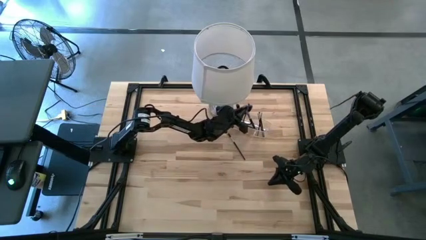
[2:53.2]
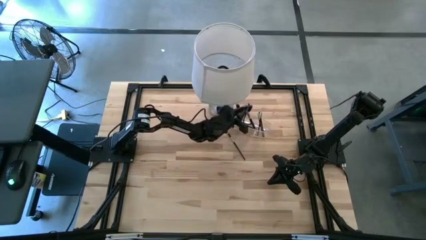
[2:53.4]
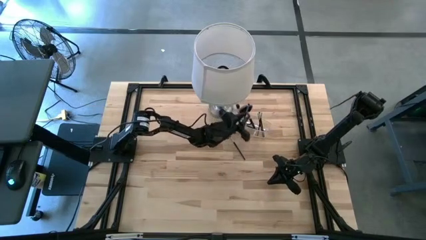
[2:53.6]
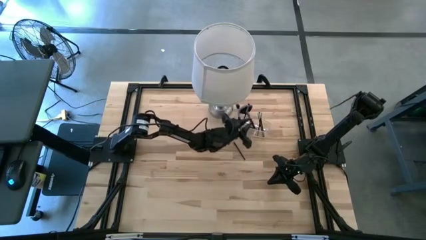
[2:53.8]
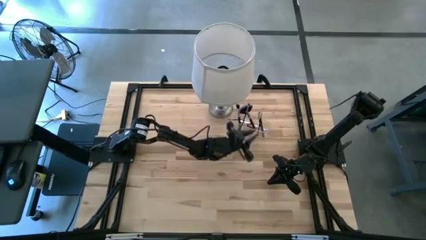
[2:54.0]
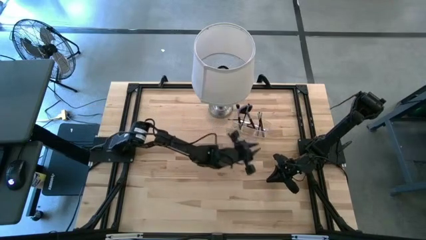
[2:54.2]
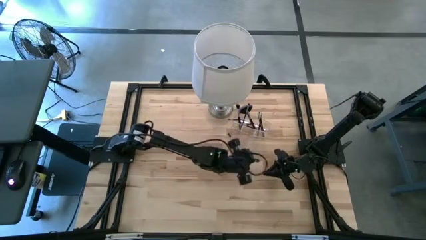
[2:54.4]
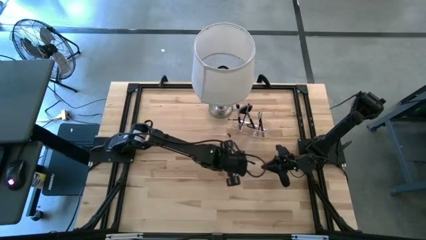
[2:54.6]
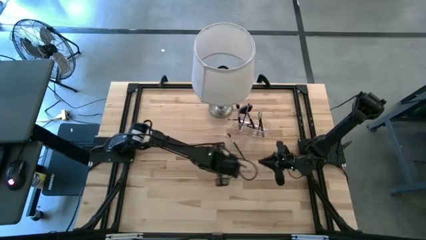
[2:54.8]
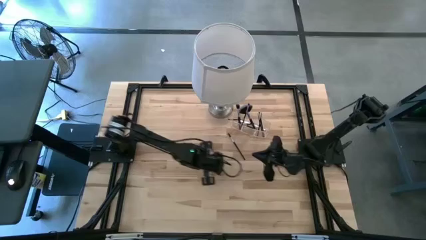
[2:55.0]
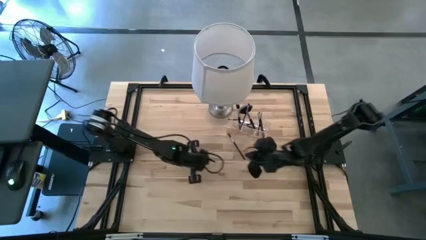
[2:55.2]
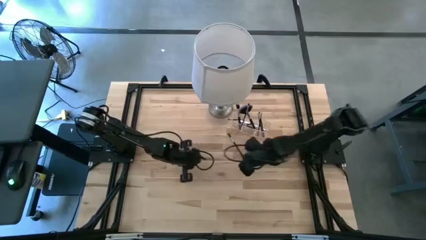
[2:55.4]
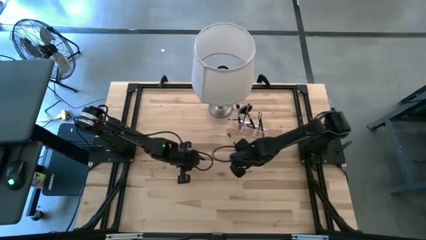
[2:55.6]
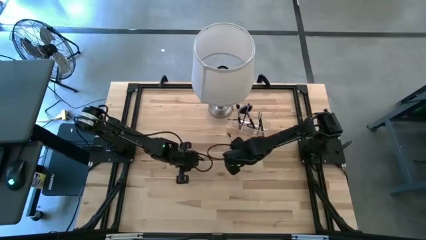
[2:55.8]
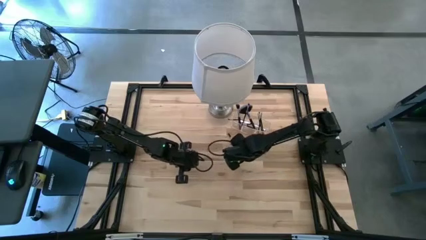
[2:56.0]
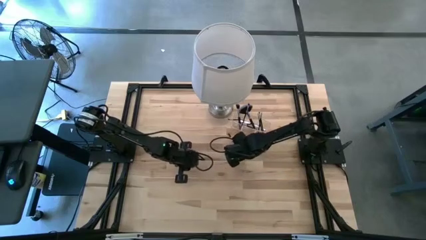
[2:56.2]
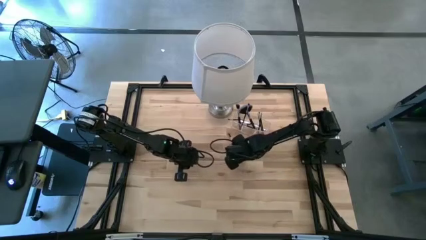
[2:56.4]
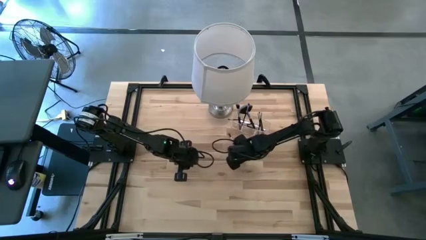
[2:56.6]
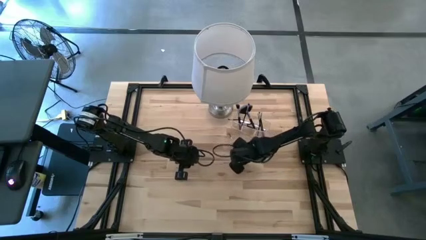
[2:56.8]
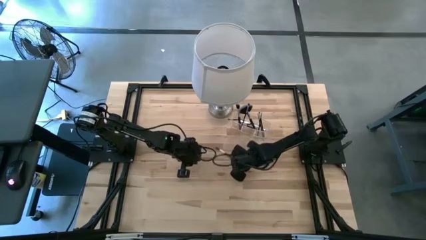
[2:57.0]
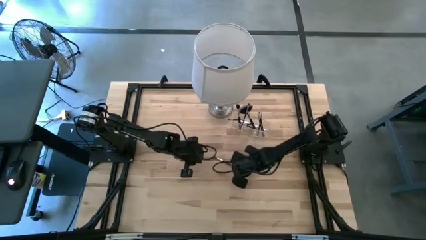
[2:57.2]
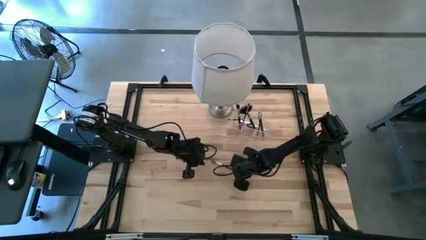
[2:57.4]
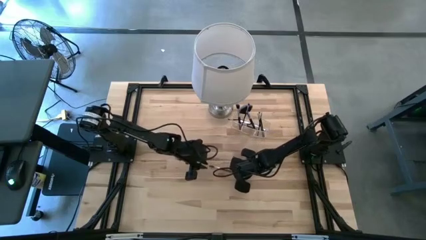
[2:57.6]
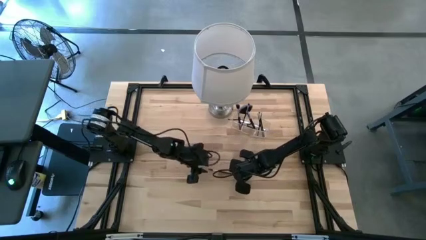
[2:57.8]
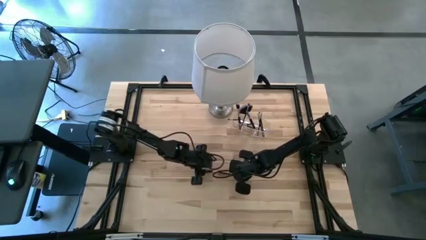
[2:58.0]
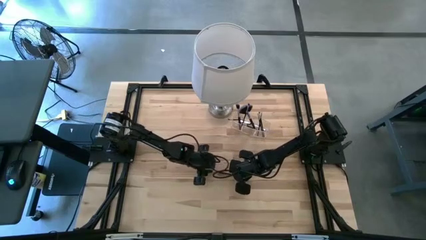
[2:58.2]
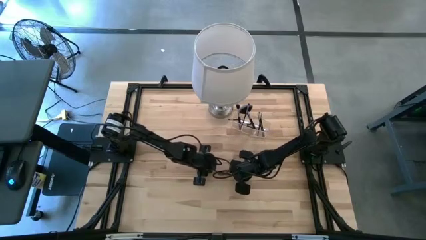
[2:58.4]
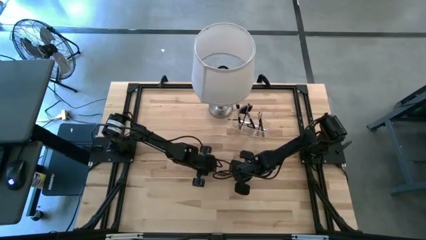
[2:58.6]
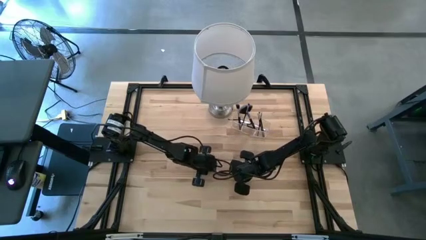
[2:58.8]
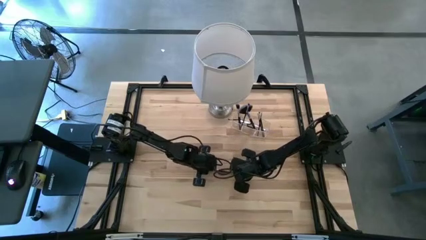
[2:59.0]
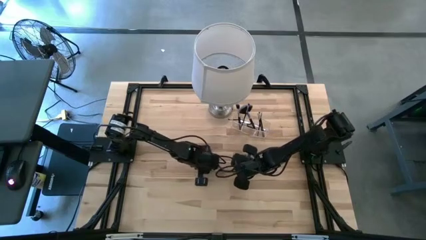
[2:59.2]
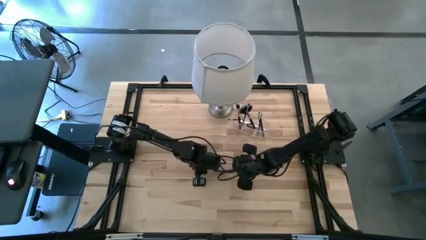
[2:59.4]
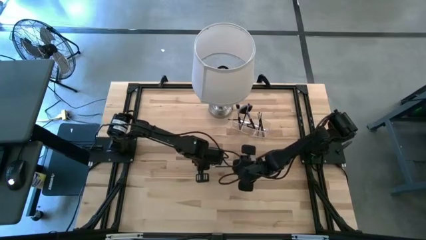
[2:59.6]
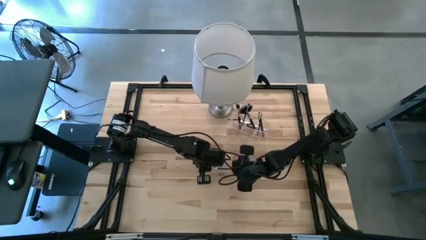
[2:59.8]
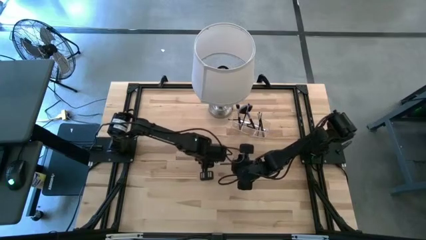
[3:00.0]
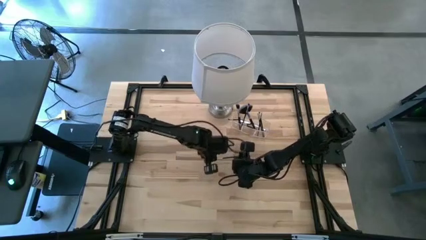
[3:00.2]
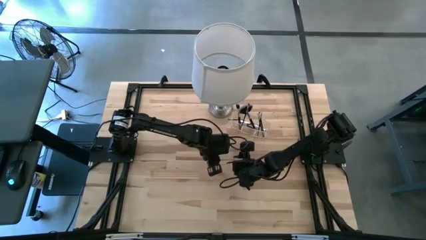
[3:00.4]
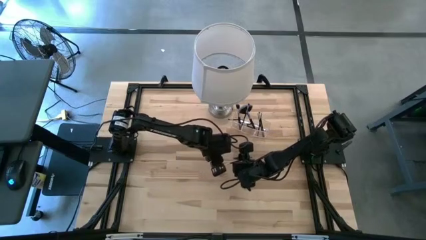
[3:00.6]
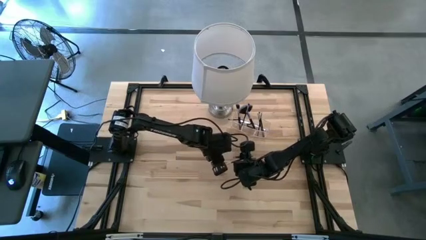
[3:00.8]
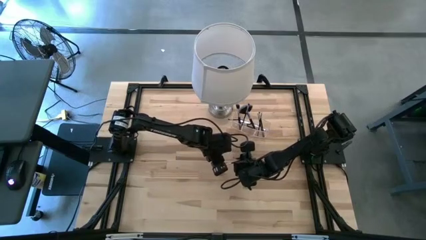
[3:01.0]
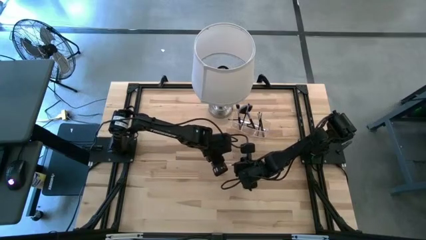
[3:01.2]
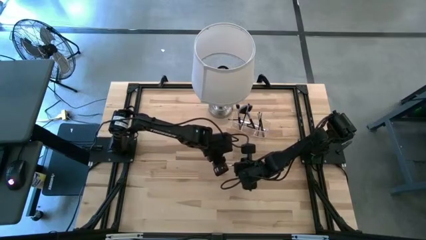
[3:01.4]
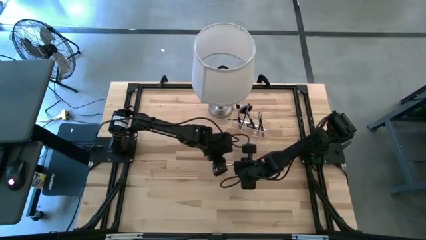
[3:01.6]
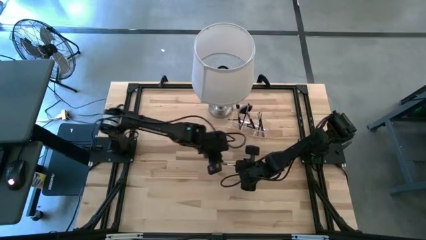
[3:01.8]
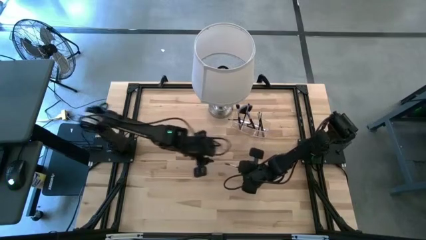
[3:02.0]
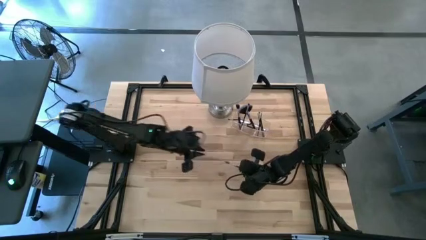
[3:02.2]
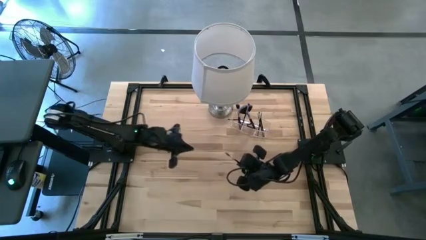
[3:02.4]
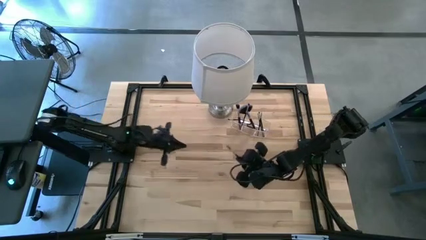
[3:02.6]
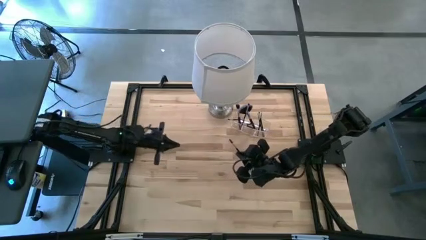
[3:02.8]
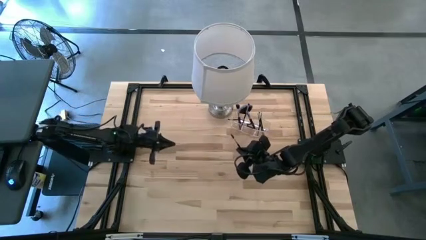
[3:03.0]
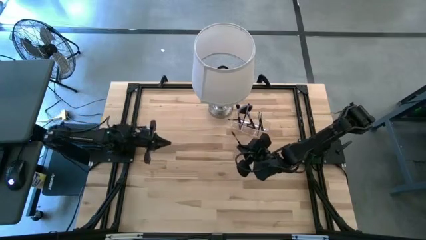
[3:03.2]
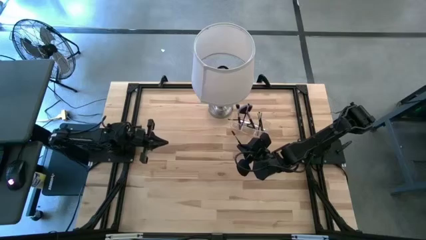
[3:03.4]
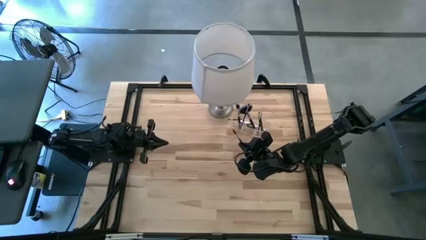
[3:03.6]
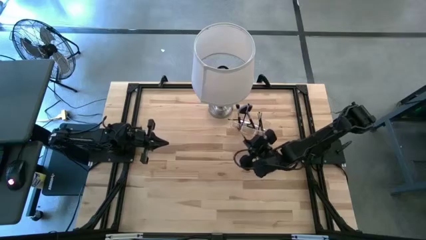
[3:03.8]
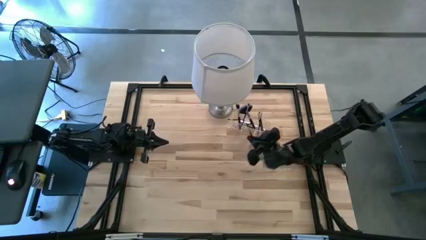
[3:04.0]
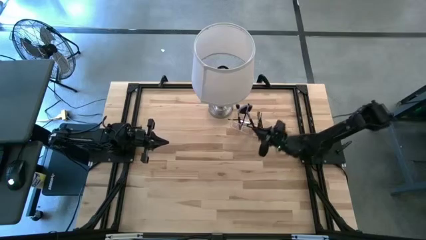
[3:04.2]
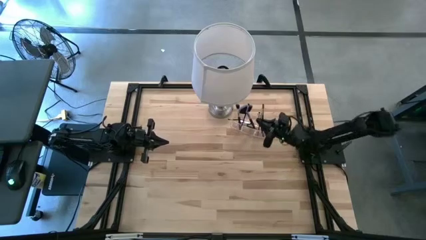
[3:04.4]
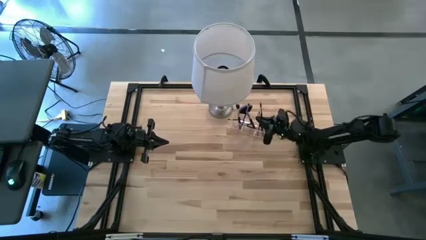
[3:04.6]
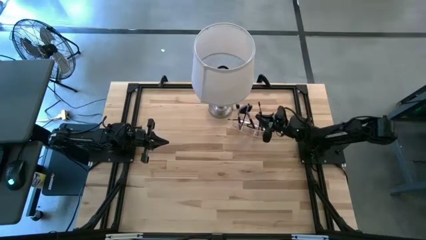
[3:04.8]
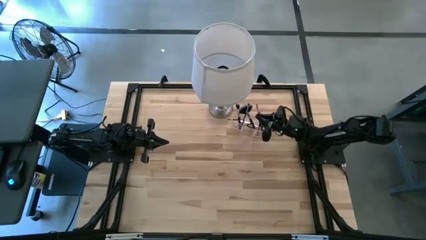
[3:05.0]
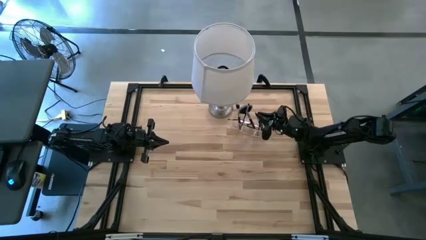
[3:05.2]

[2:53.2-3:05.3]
Task: Put items in baskets/containers
Put the lash brush into the transparent organizer

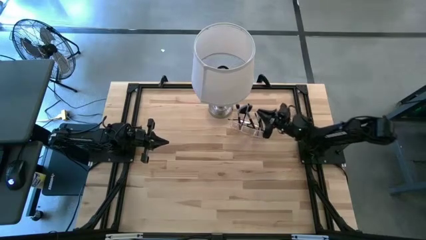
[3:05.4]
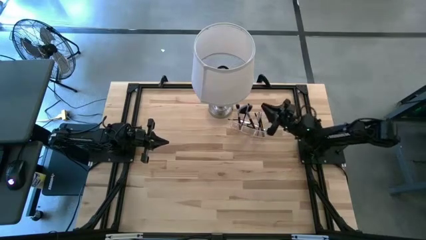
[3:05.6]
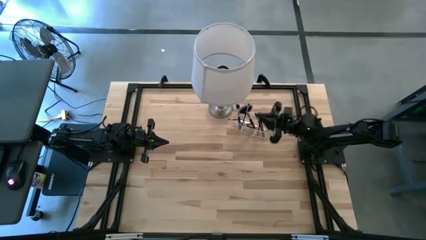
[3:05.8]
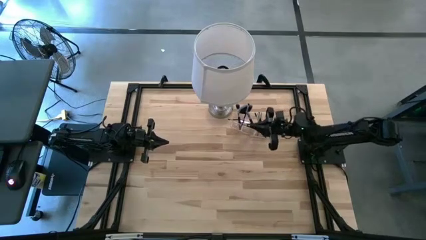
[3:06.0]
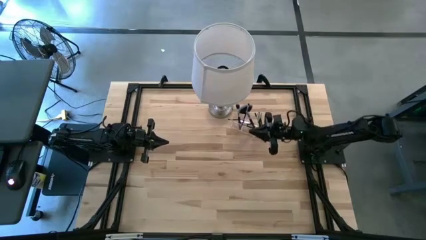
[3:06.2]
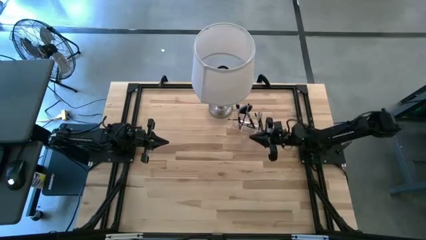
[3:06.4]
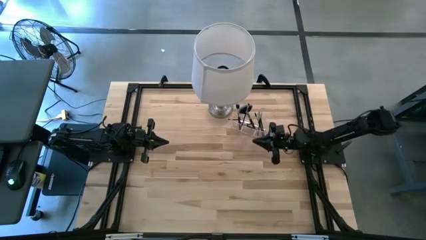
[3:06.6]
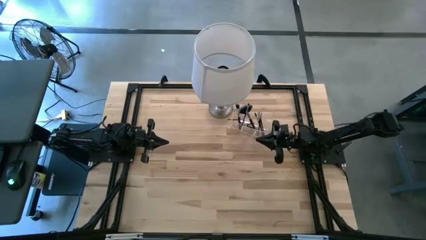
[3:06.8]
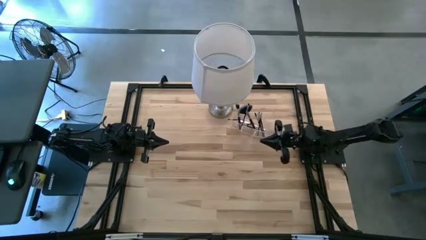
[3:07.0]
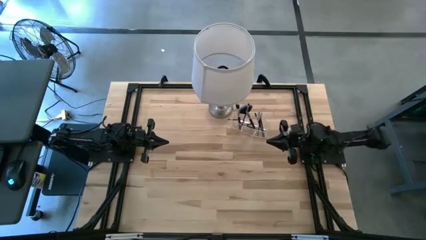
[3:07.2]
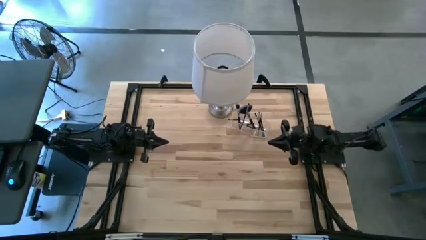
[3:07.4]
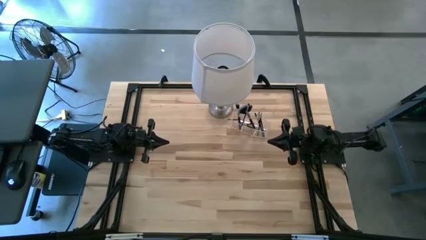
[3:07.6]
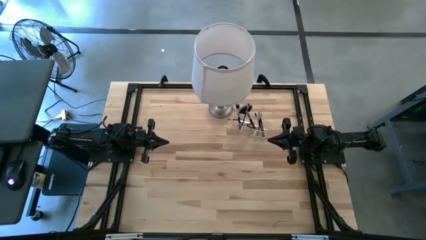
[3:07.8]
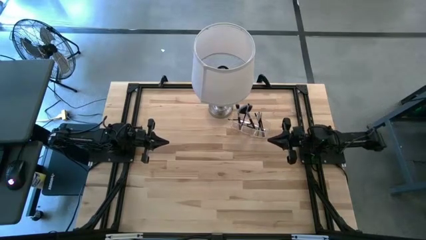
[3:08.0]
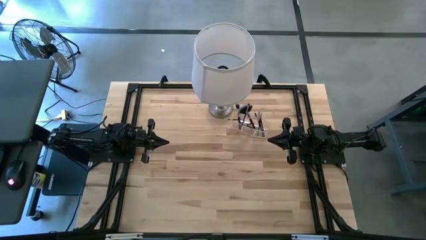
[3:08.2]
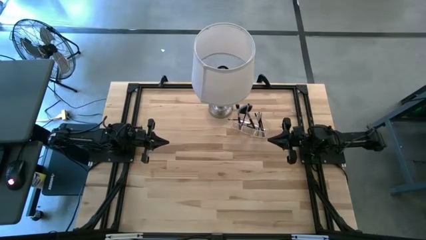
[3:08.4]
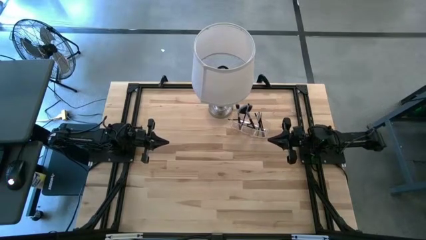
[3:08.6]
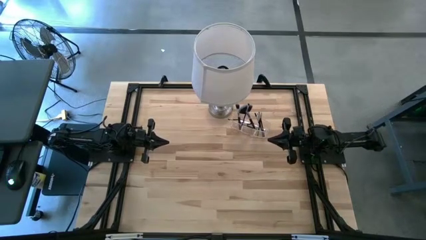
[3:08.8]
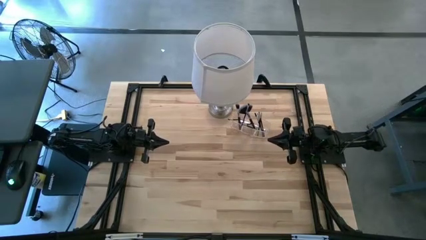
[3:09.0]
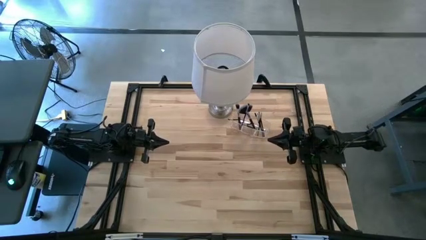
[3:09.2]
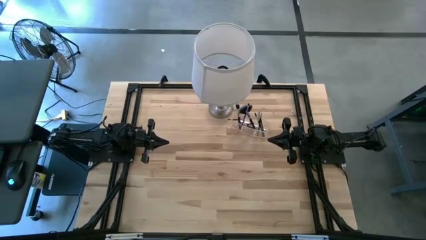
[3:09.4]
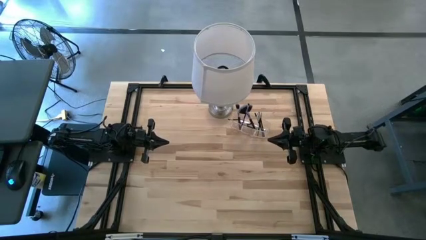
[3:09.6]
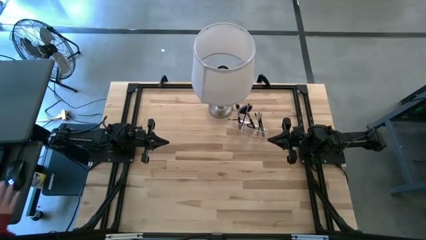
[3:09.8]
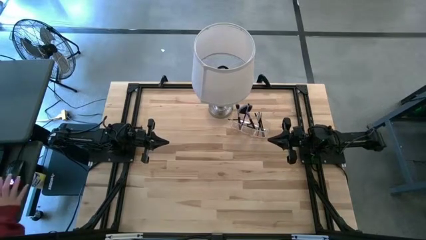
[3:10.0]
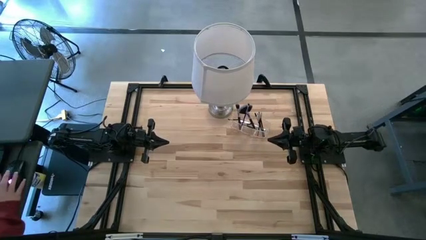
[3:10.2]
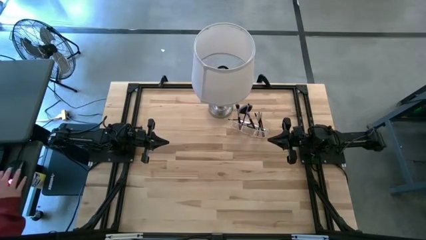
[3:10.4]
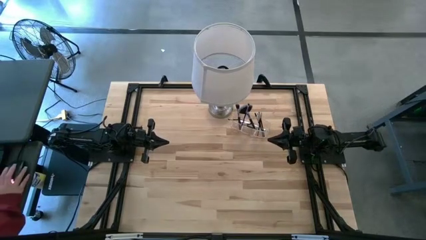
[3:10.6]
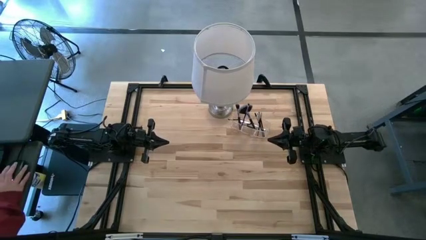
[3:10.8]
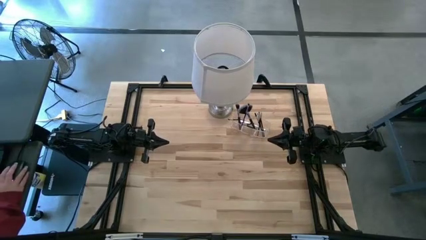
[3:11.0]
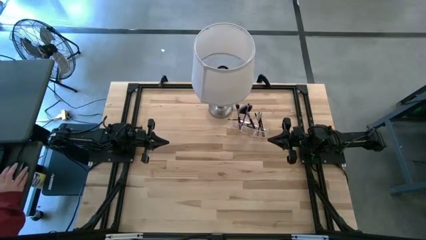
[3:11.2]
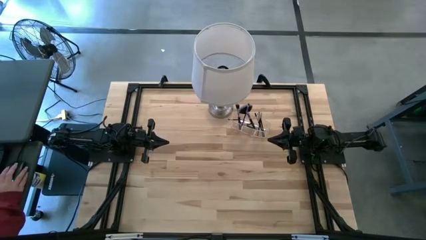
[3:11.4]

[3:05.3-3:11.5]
Return to home position
